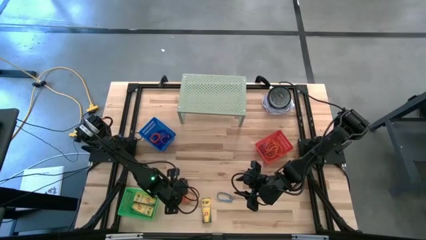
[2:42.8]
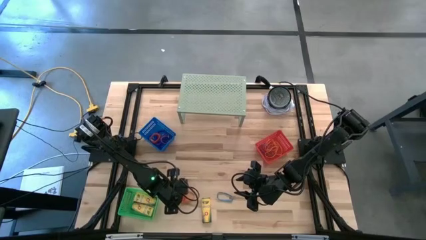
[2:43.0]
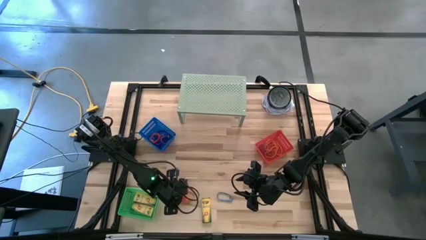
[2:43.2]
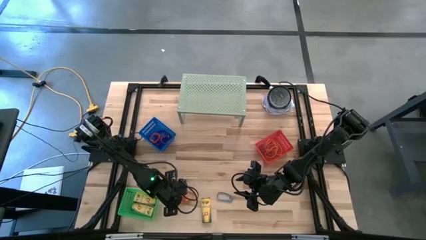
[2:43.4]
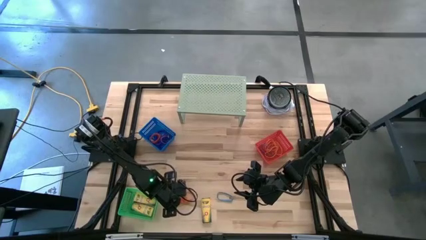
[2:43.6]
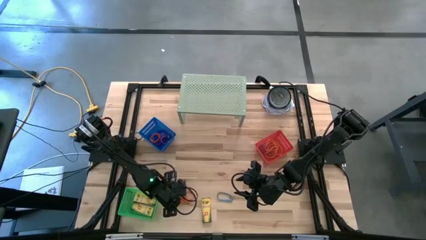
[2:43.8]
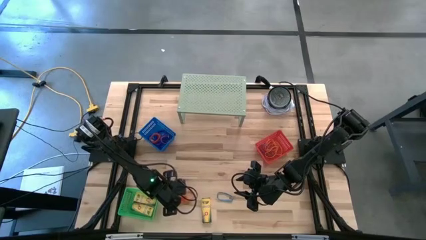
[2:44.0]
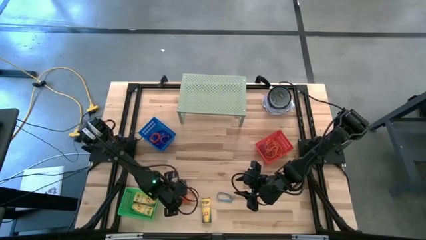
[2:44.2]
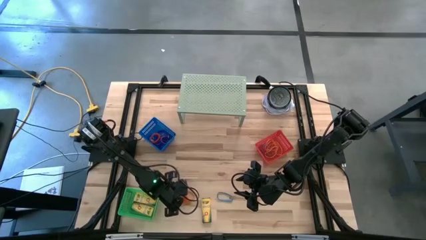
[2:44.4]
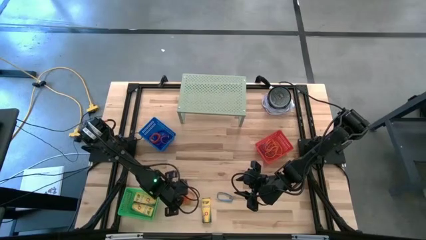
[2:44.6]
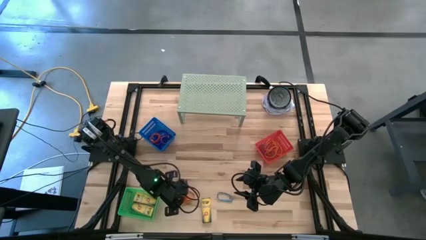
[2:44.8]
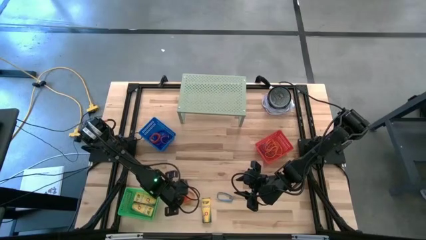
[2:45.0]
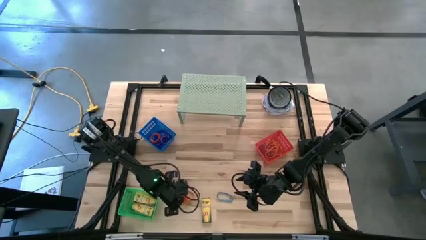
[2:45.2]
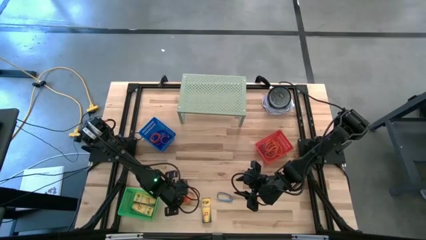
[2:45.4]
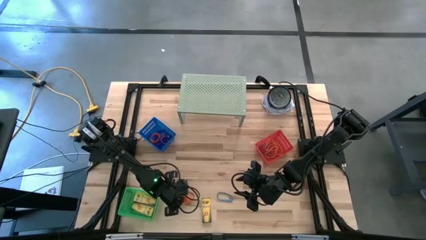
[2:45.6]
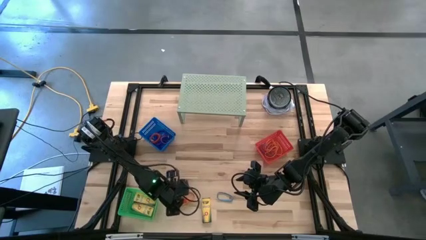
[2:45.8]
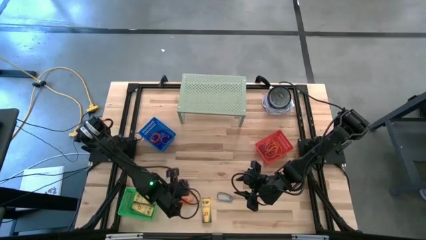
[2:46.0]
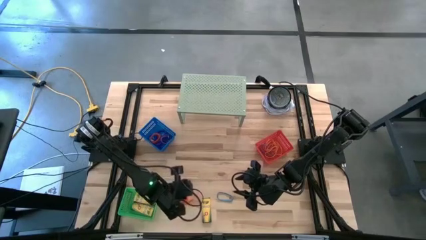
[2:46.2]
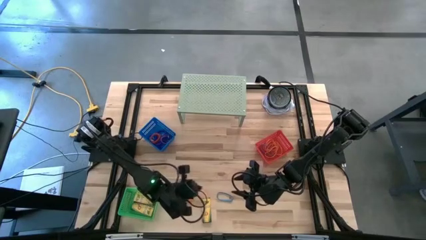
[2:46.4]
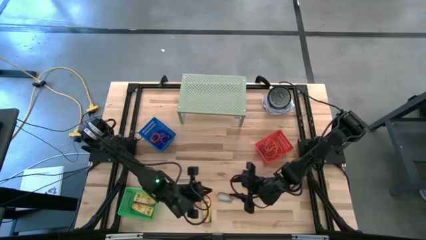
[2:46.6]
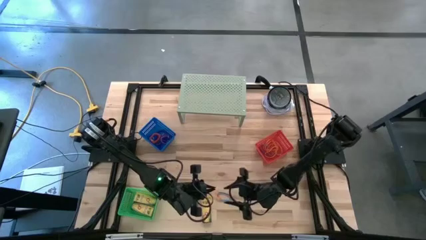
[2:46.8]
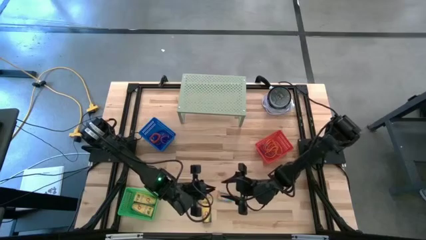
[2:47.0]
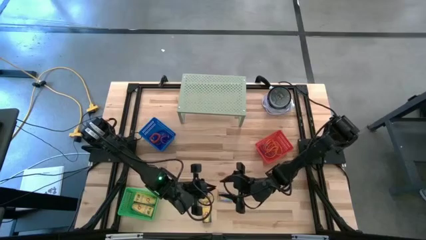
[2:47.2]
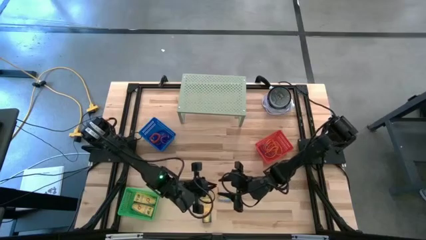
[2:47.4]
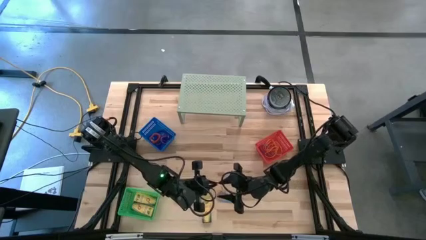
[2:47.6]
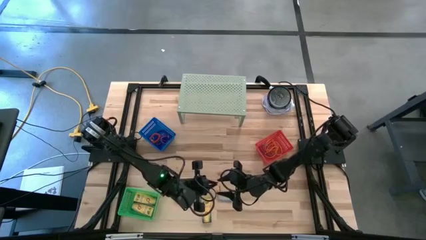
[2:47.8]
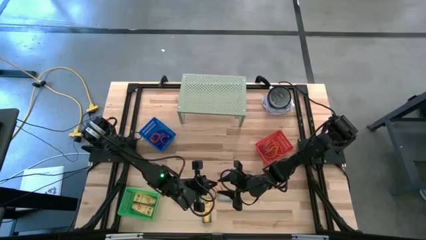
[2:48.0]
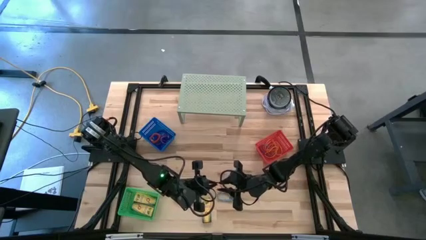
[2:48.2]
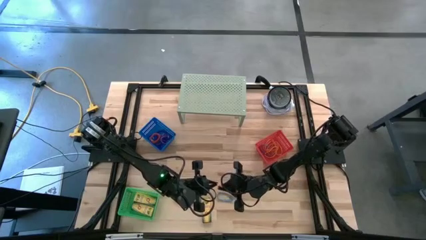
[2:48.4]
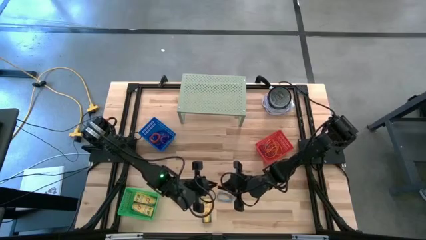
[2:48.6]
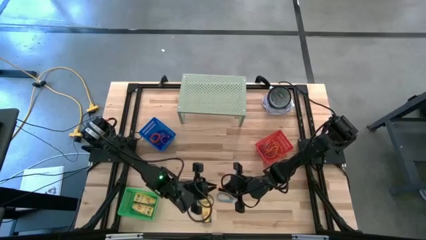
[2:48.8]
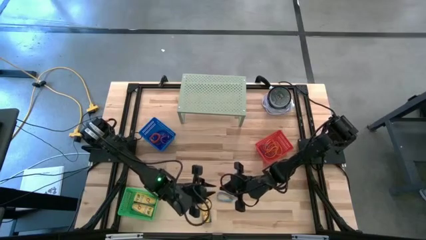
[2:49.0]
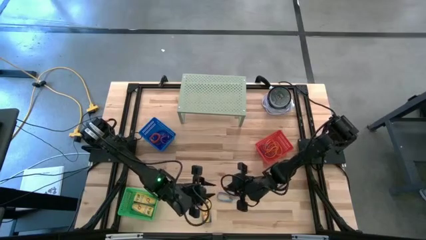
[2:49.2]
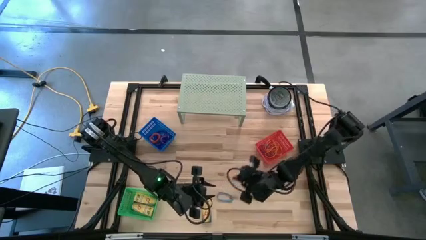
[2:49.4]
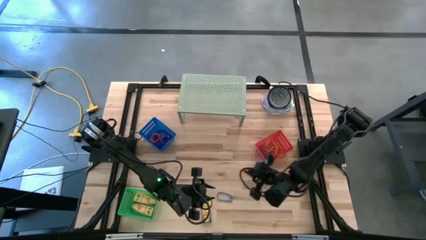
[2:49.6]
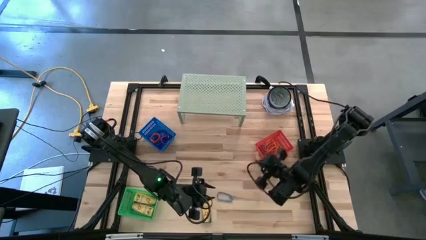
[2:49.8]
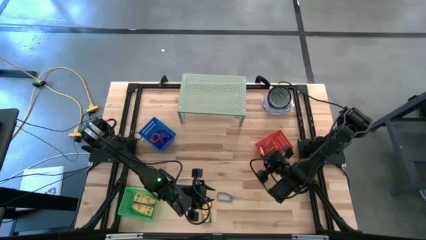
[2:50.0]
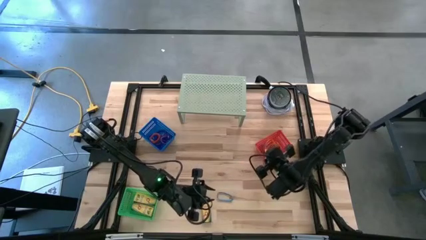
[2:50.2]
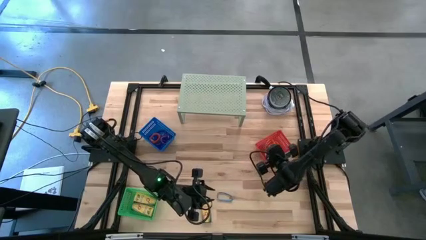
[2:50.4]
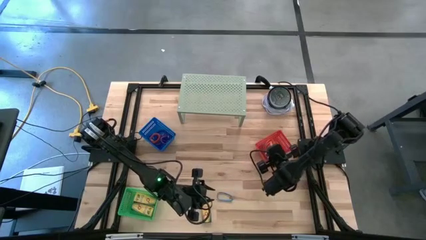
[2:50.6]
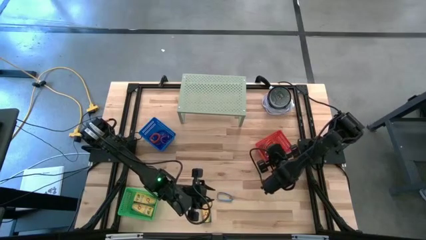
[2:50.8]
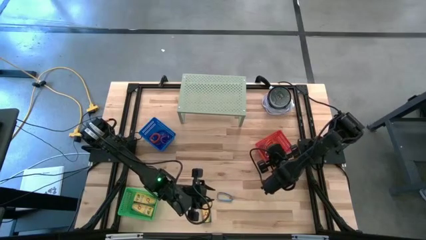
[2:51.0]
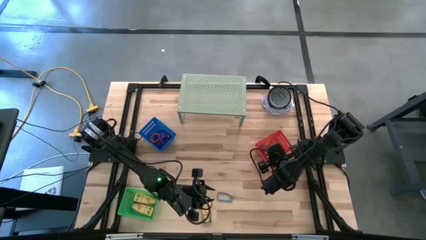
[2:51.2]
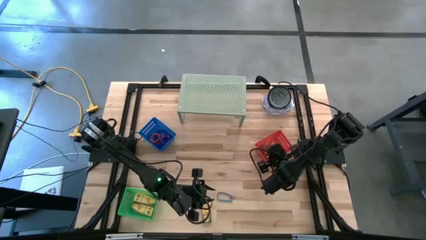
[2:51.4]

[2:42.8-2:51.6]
Task: Pick & Place Office Desk Supplies
Put the orange rubberband into the red bin

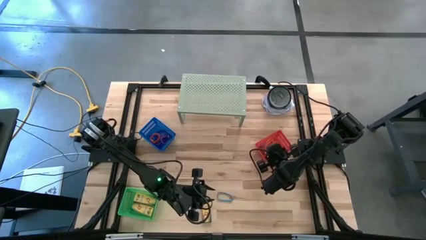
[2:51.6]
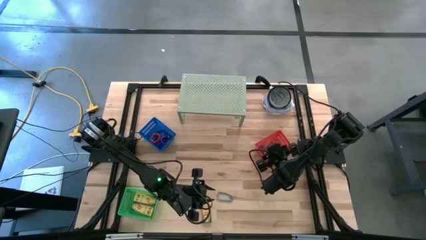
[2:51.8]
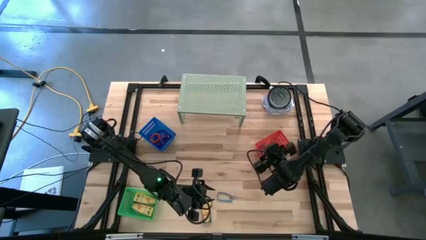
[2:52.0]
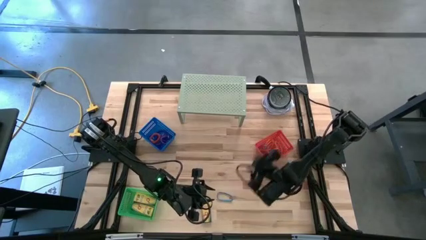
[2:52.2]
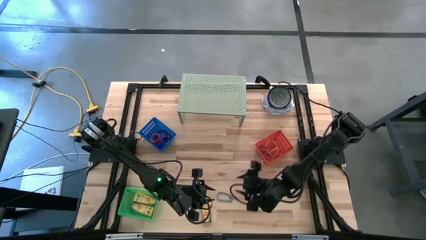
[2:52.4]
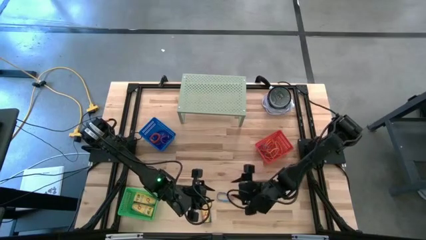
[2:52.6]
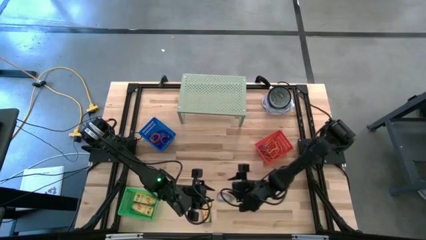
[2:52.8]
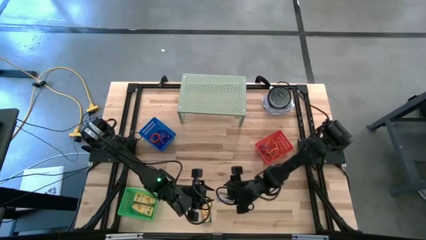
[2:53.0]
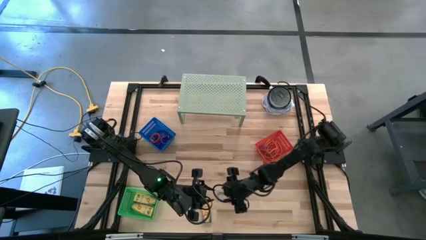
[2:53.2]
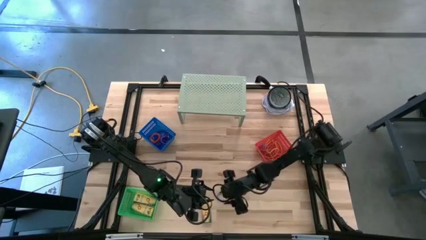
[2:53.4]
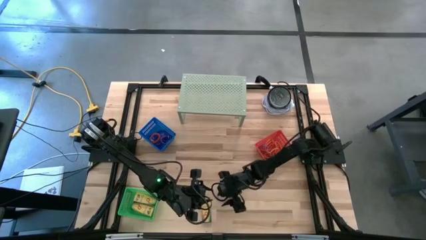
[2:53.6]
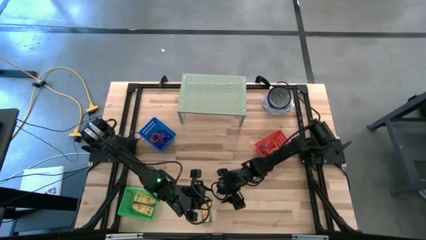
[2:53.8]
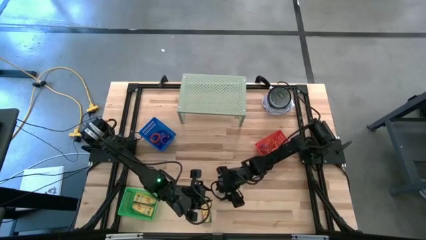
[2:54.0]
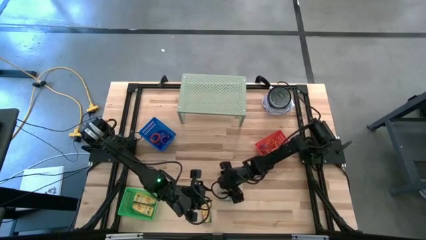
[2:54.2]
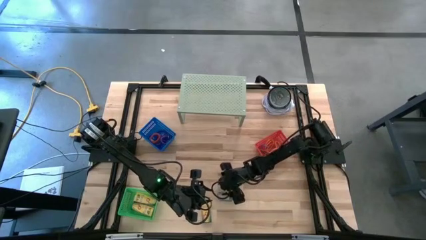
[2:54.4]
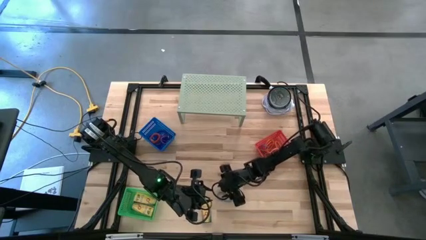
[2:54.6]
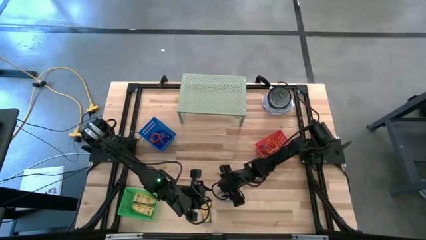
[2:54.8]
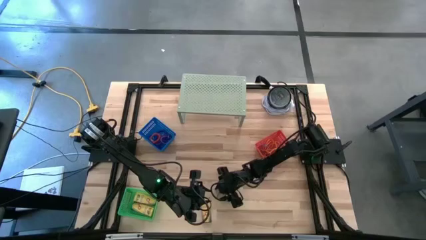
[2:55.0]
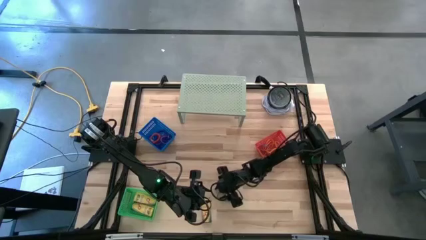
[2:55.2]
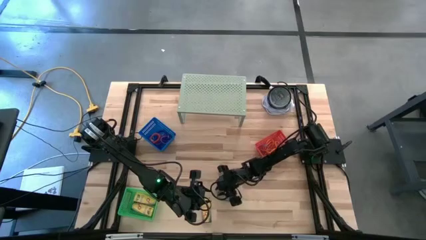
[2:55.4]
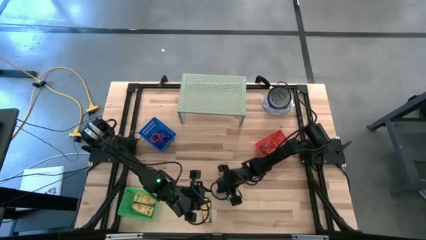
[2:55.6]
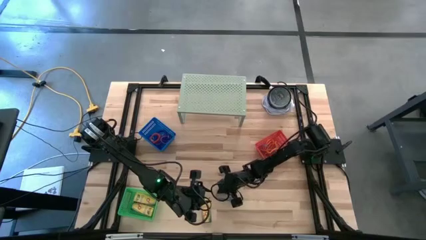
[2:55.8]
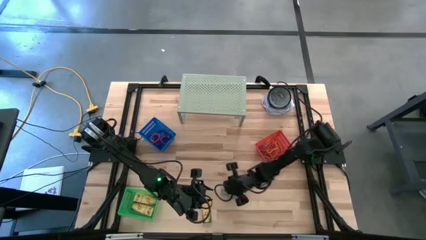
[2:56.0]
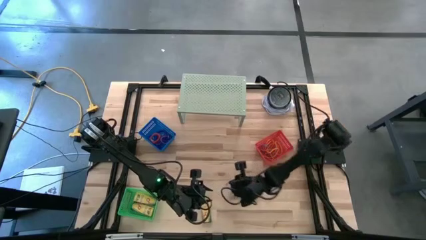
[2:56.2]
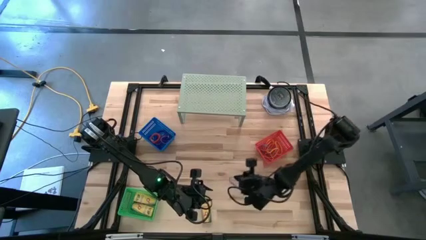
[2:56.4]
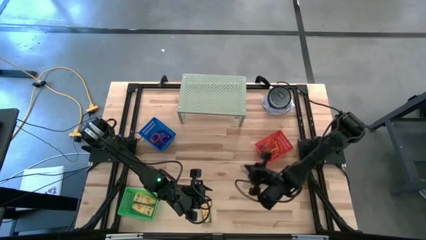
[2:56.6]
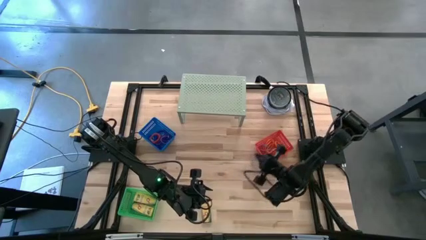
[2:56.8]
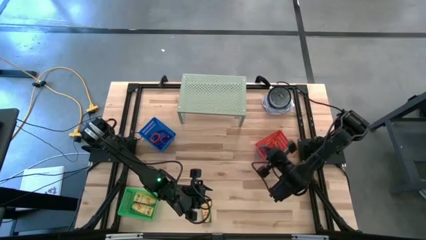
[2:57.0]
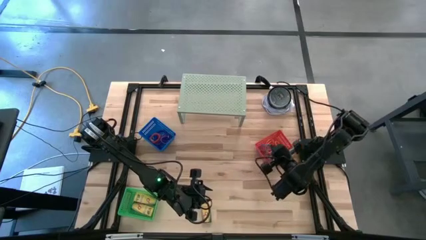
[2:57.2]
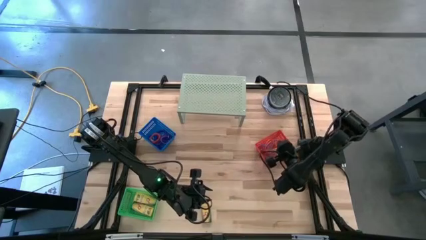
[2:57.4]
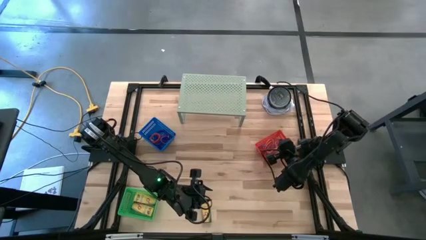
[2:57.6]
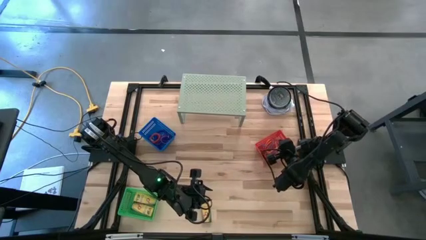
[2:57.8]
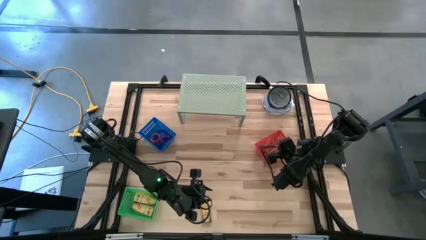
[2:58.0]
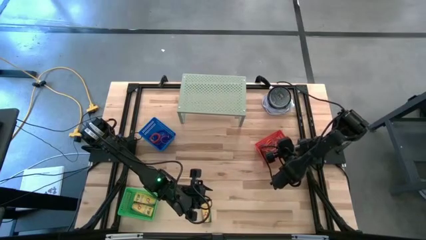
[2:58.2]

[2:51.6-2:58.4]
Put the blue rubberband into the red bin

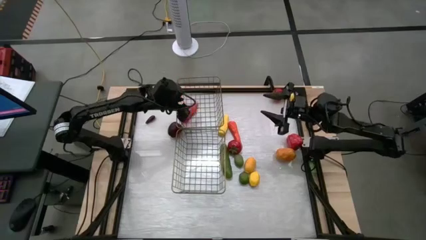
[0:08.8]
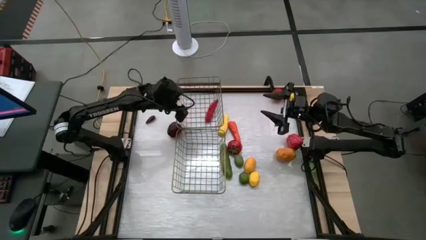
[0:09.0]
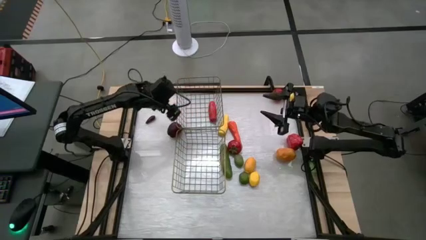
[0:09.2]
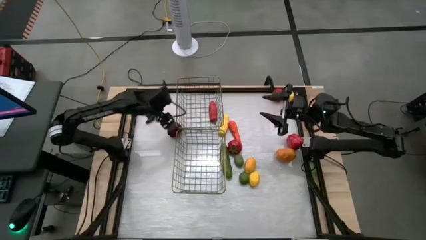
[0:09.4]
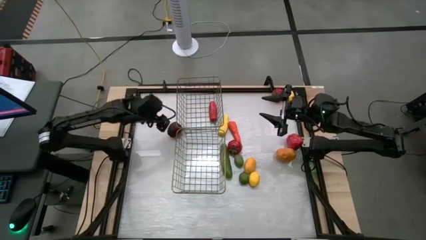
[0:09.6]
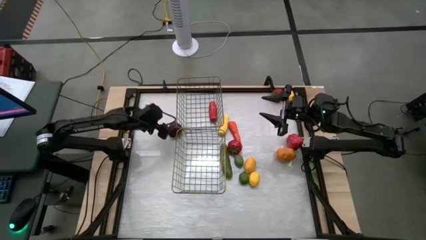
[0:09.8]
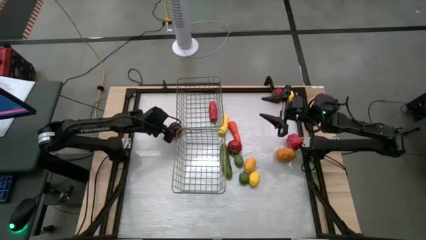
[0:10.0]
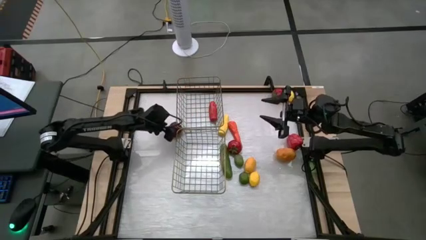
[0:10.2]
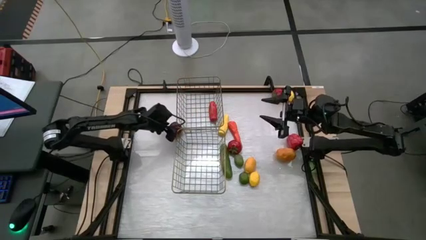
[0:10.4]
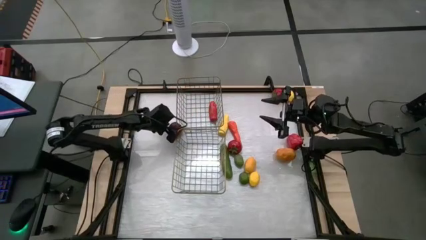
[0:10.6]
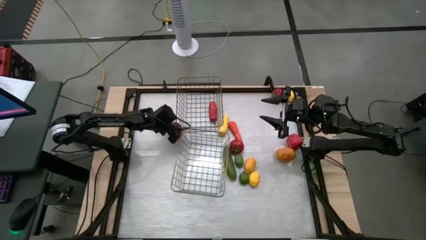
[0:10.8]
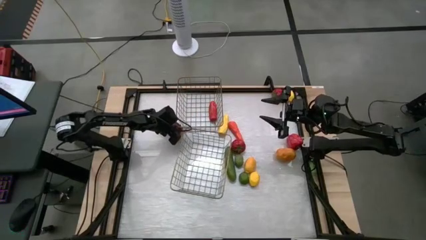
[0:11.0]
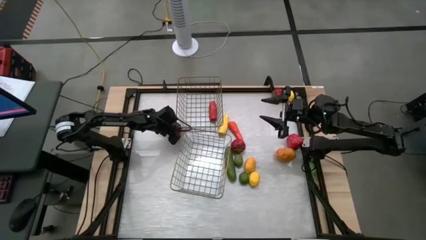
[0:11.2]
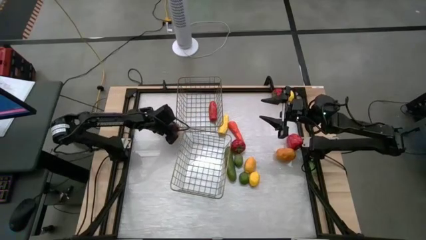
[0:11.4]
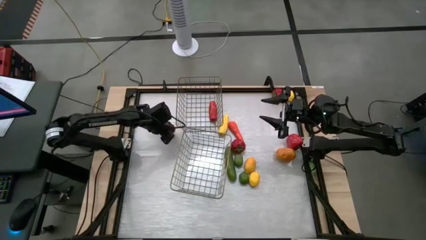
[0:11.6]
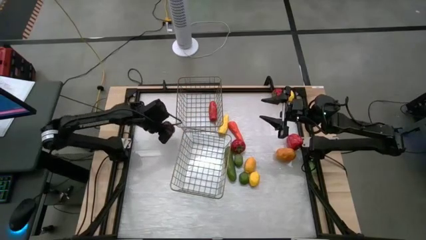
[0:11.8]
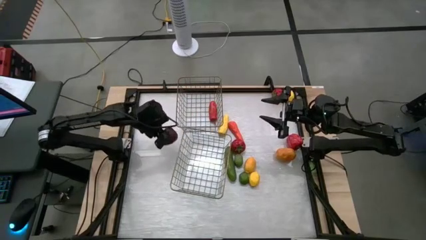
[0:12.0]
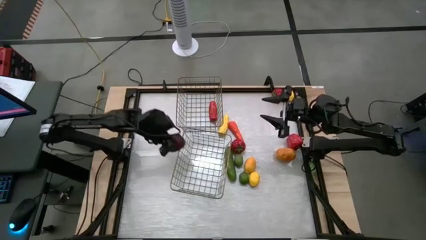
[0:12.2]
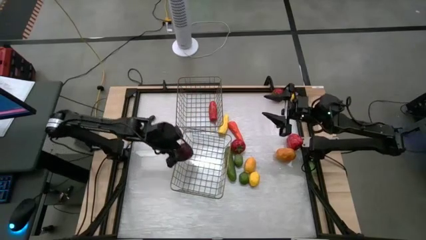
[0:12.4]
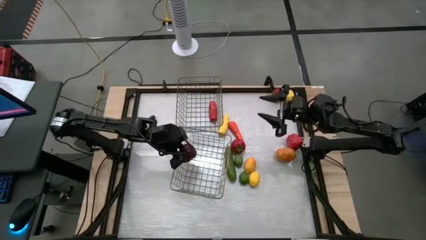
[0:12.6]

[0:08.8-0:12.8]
Task: Sort produce into baskets
Put the red apple into the bottom basket
